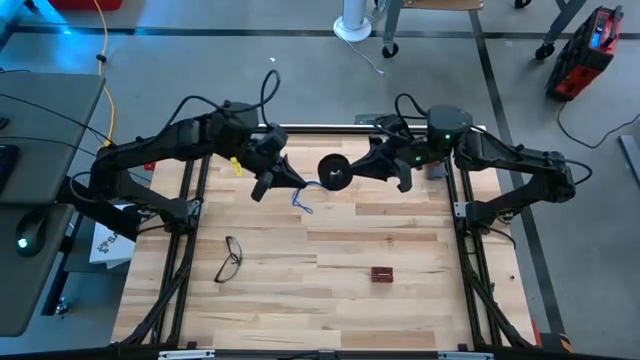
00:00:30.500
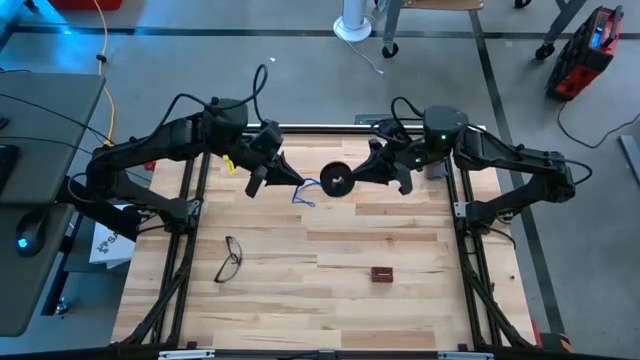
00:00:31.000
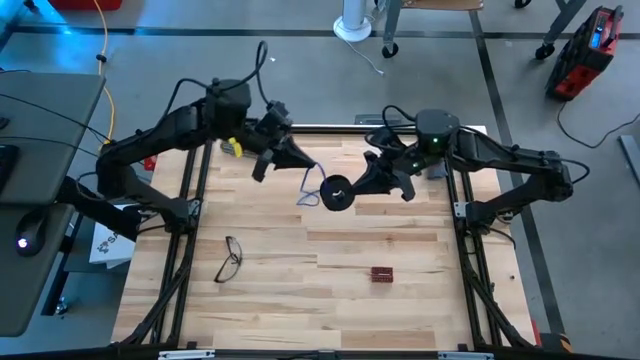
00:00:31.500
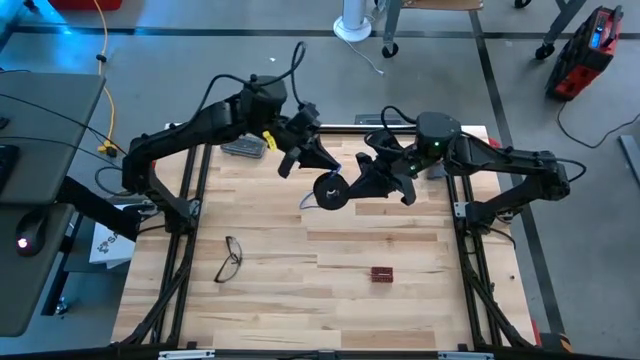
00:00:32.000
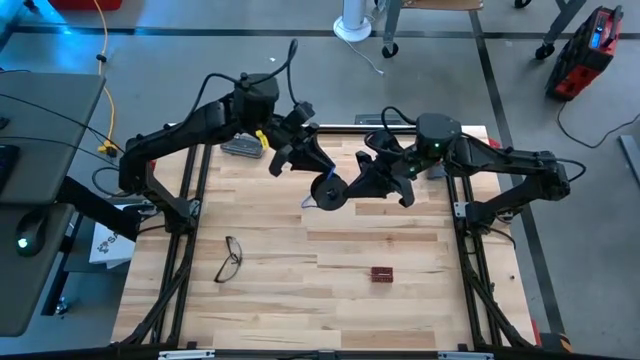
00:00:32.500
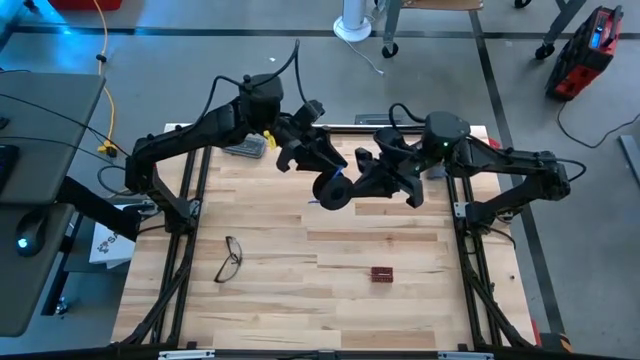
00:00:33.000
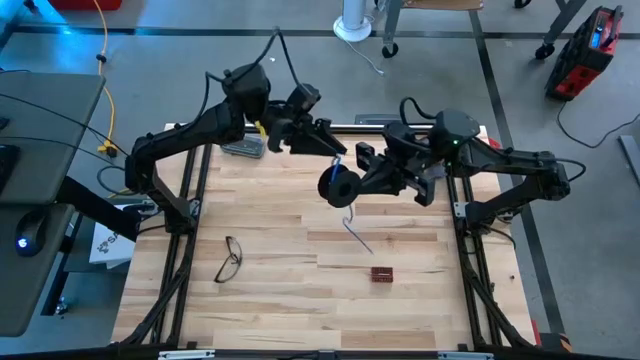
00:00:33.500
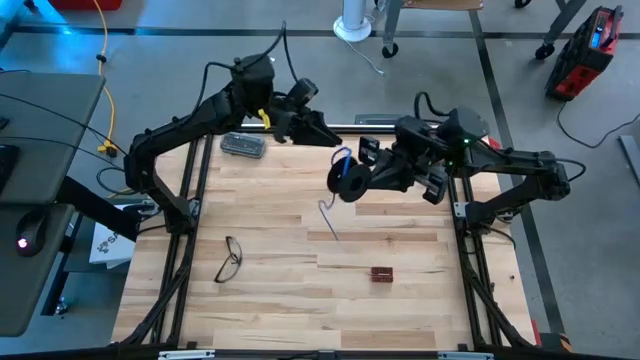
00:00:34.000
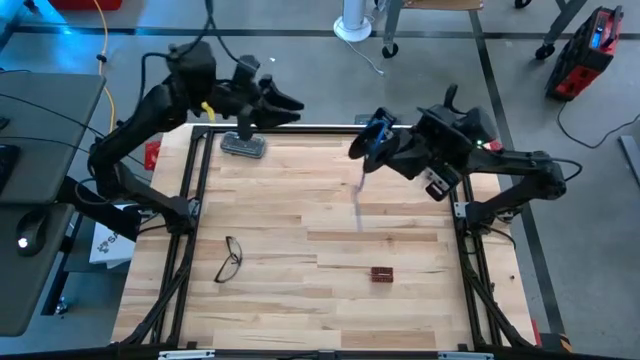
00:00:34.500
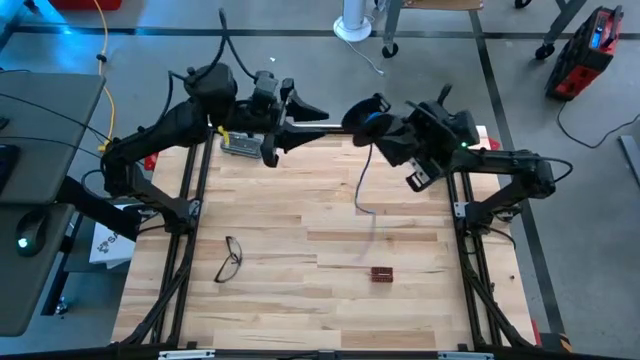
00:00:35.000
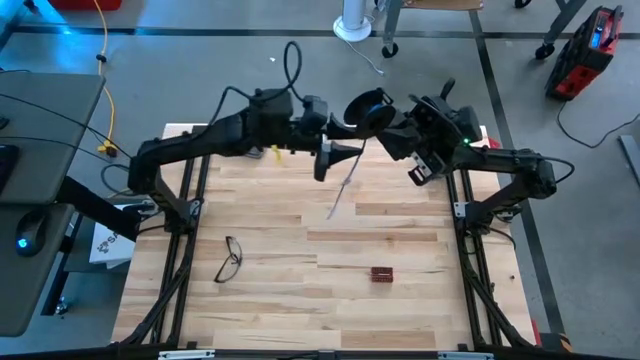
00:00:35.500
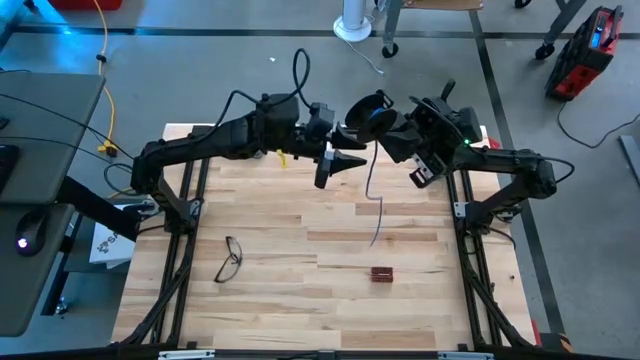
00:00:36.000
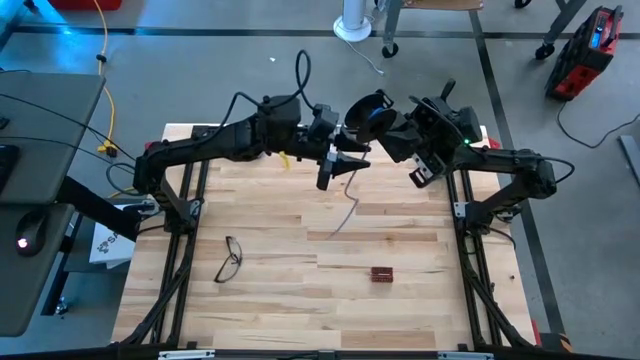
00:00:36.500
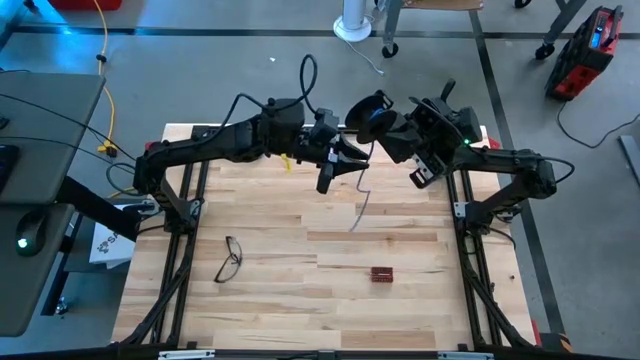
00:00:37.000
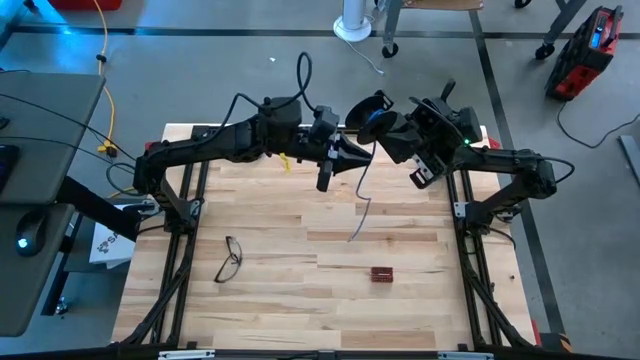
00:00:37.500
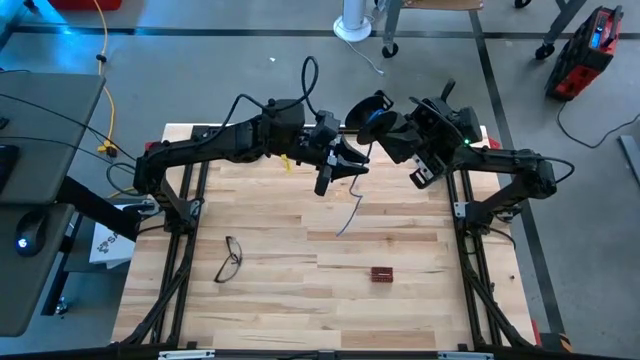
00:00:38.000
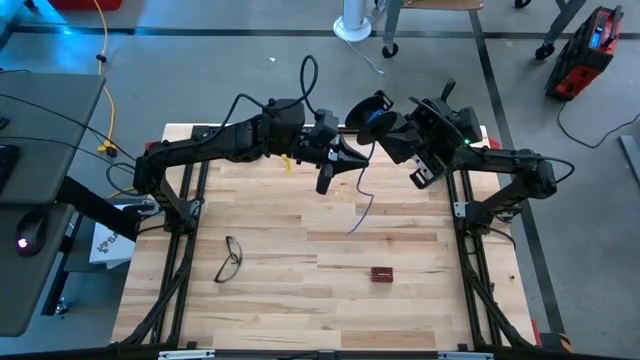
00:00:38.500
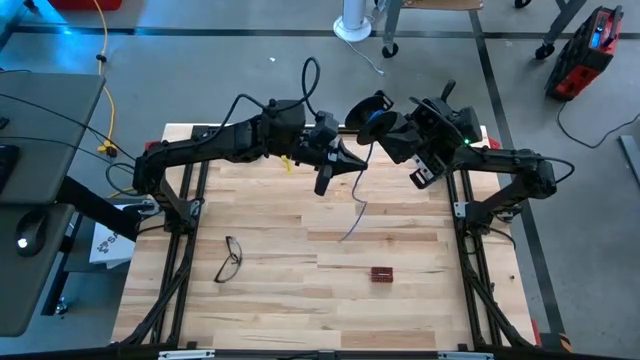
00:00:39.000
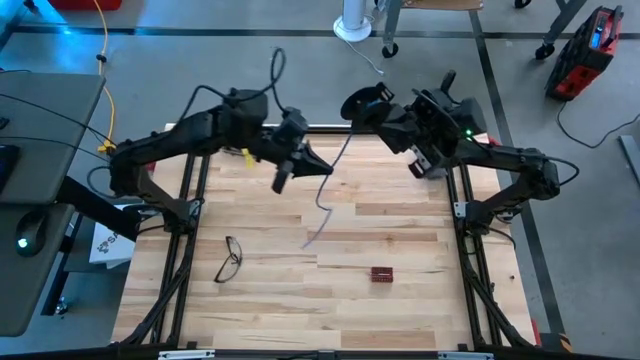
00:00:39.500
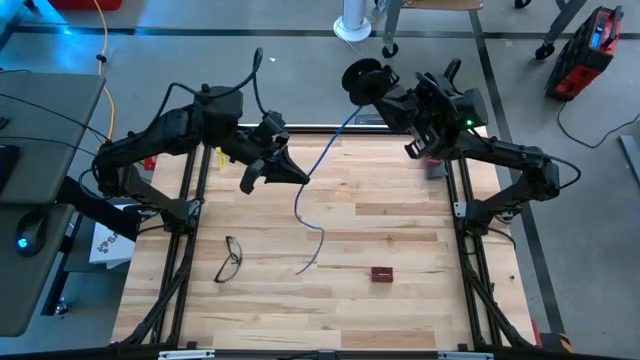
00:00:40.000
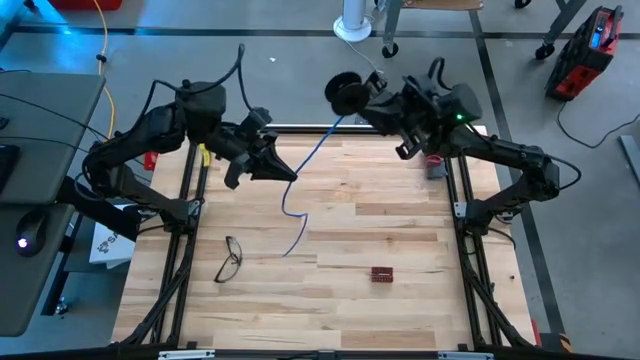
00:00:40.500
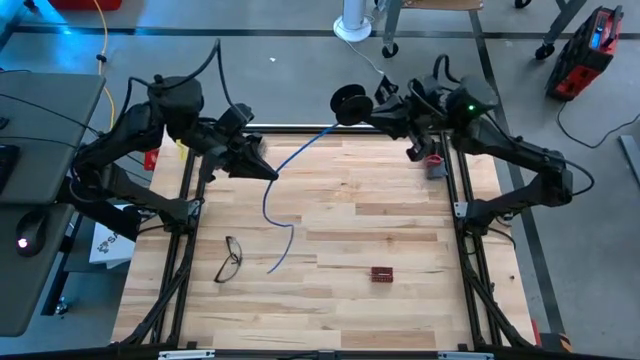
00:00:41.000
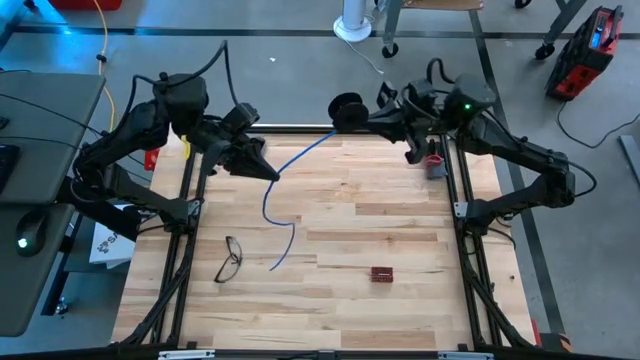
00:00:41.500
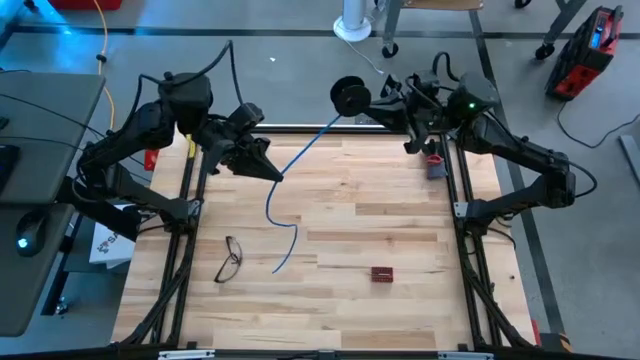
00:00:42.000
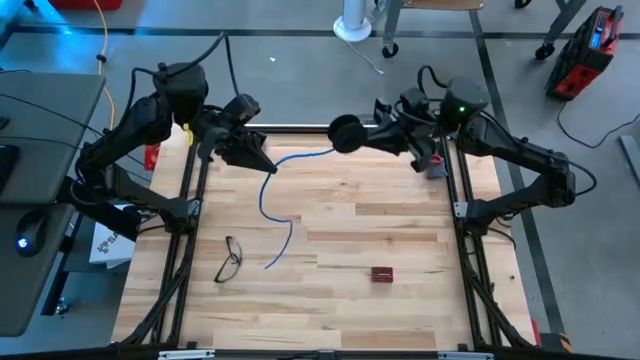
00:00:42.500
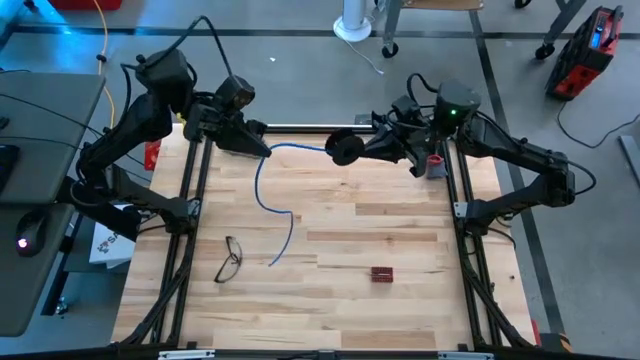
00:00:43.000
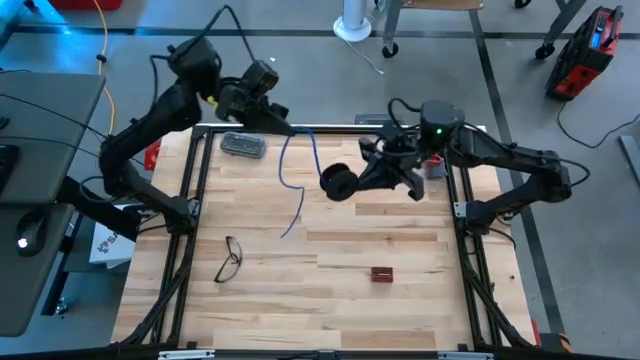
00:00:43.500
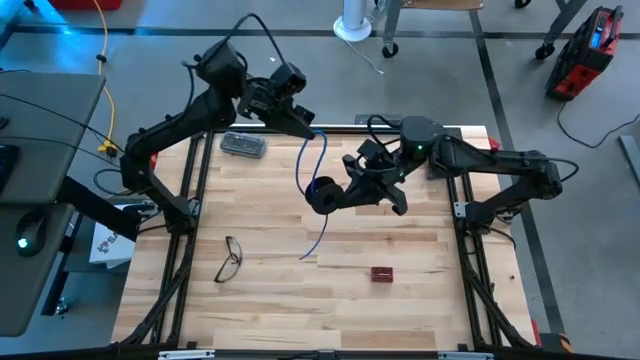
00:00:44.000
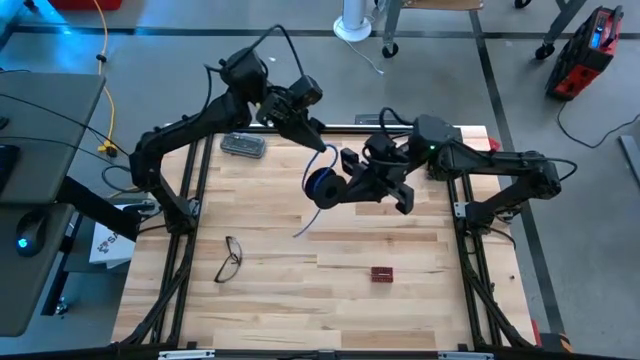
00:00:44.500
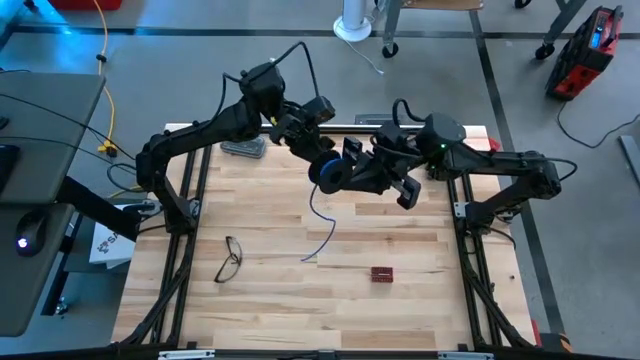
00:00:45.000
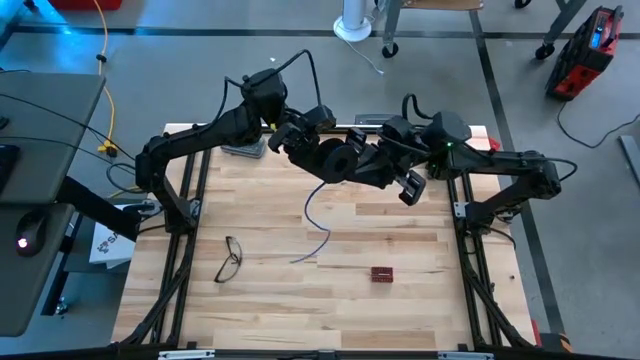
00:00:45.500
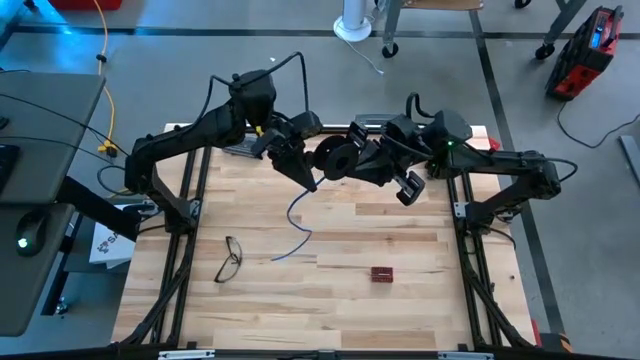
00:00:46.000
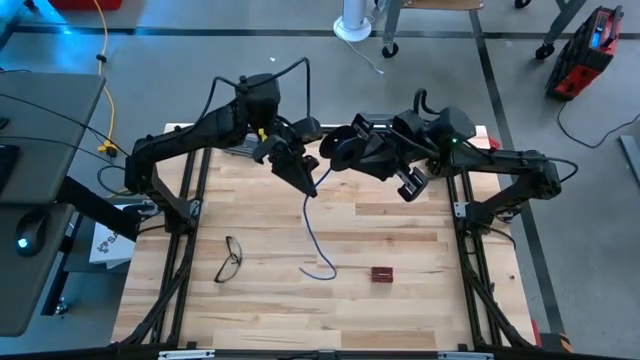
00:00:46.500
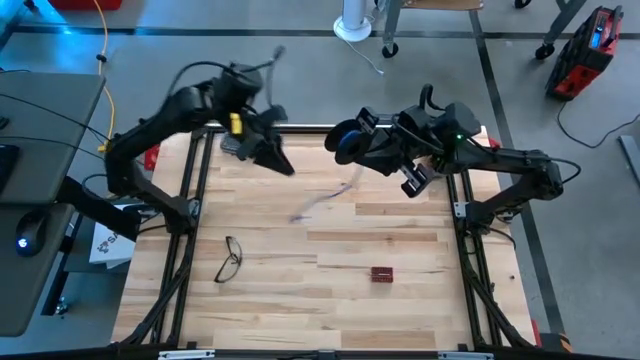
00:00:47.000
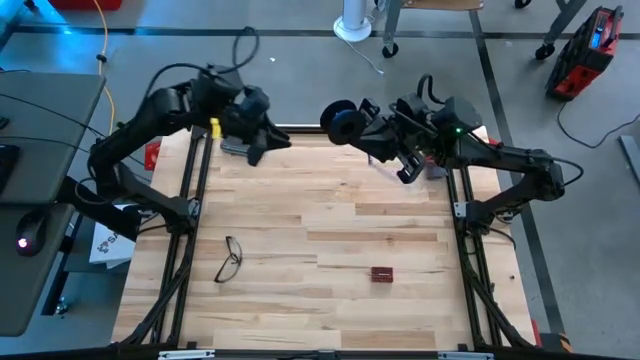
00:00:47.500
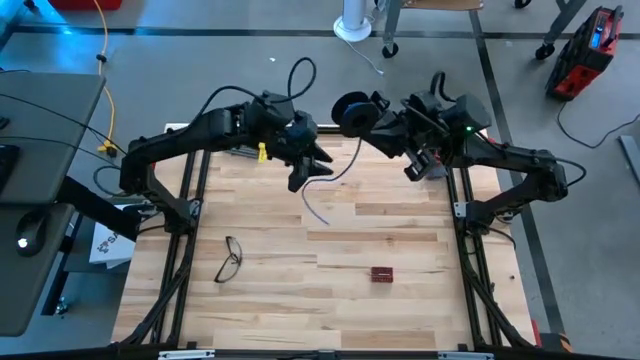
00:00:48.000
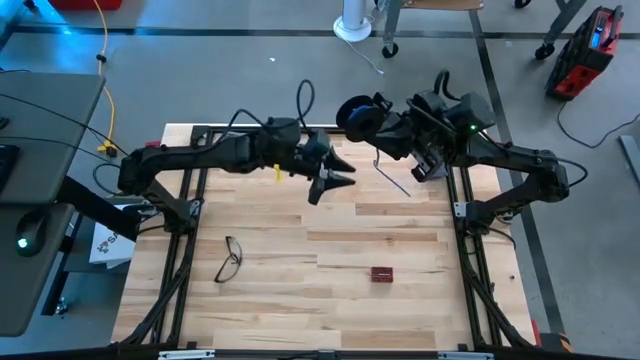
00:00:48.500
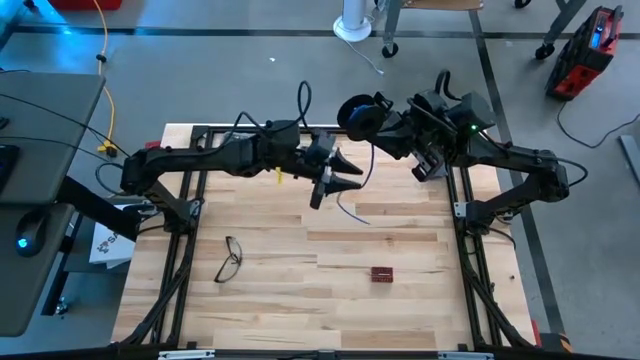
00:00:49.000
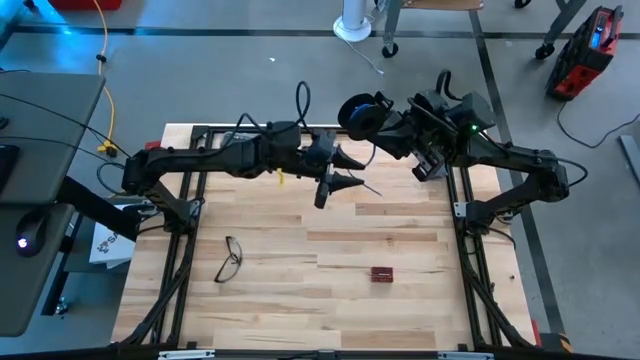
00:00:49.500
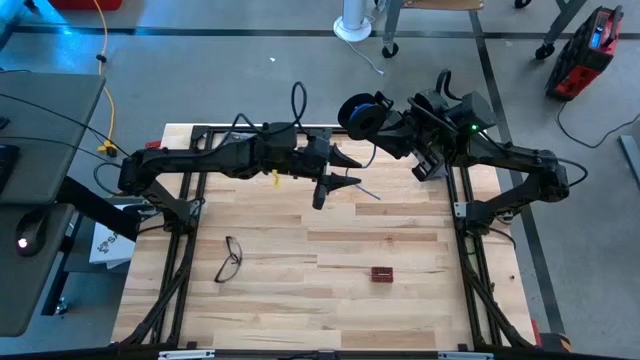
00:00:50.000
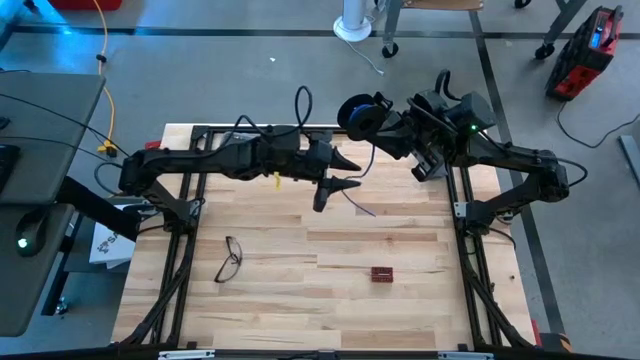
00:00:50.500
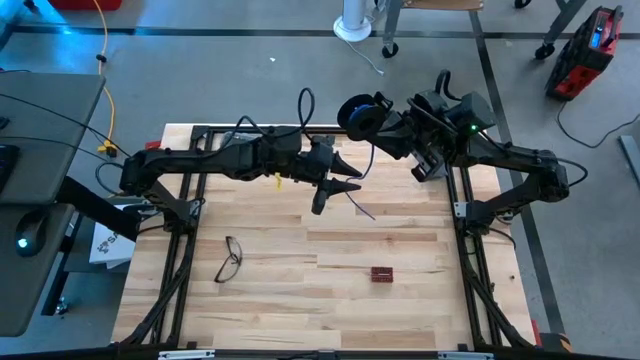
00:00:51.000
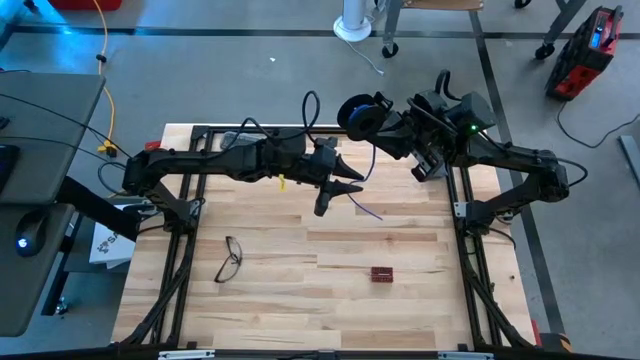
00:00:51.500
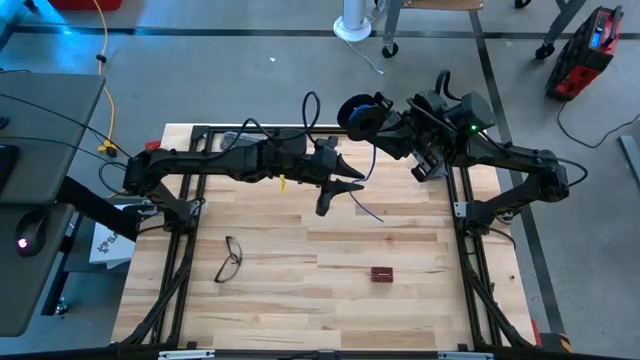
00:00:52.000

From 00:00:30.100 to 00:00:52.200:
Task: Coil cords
Coil the blue wire onto the spool
